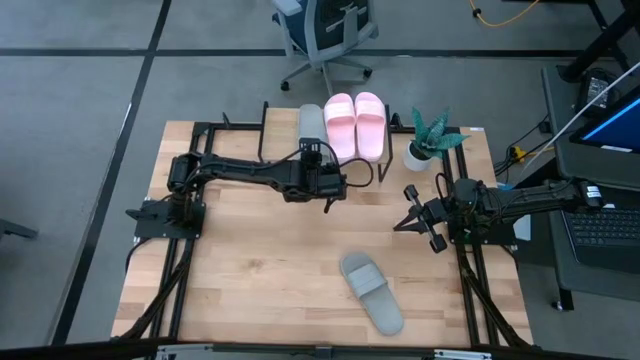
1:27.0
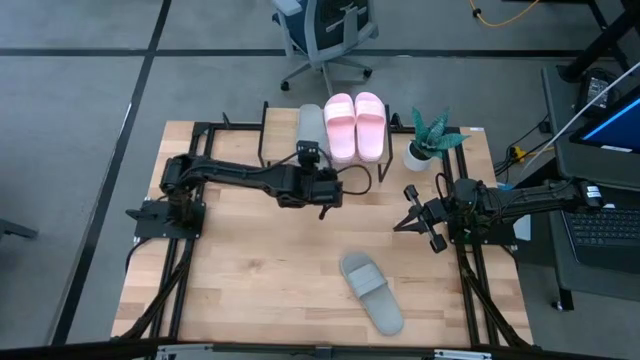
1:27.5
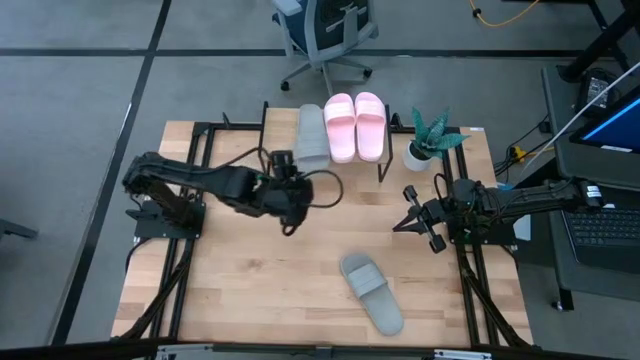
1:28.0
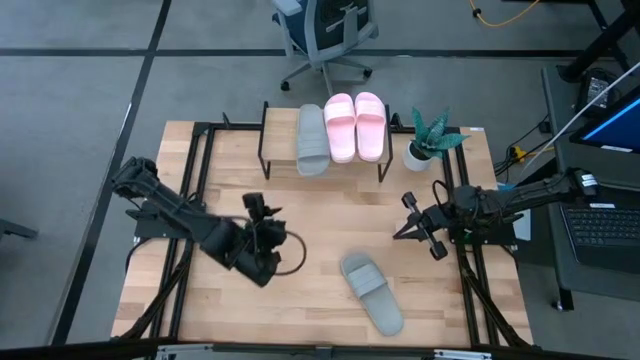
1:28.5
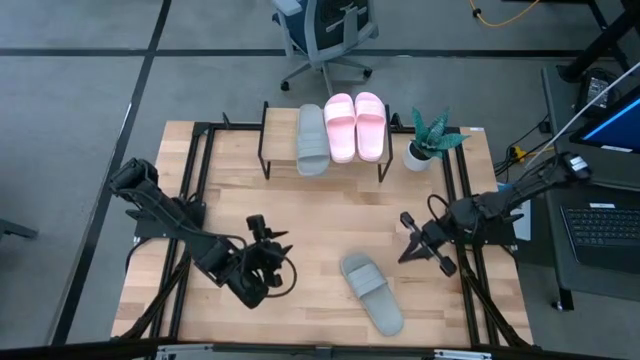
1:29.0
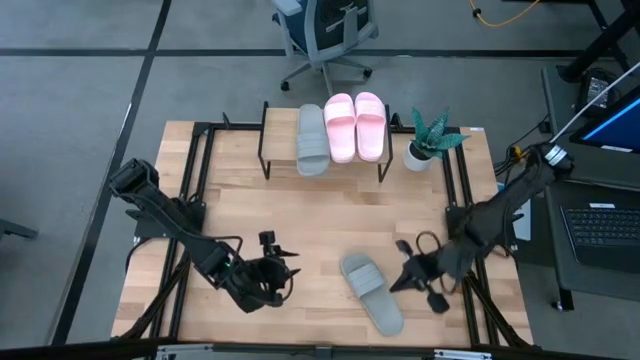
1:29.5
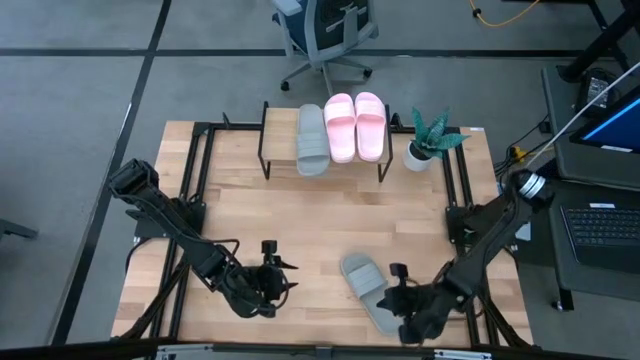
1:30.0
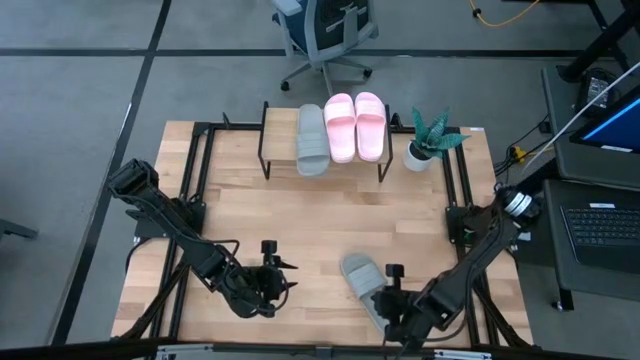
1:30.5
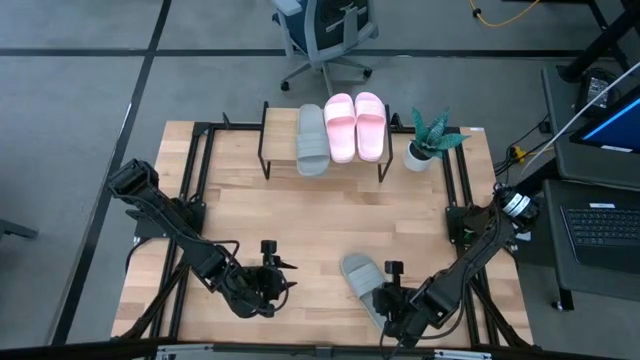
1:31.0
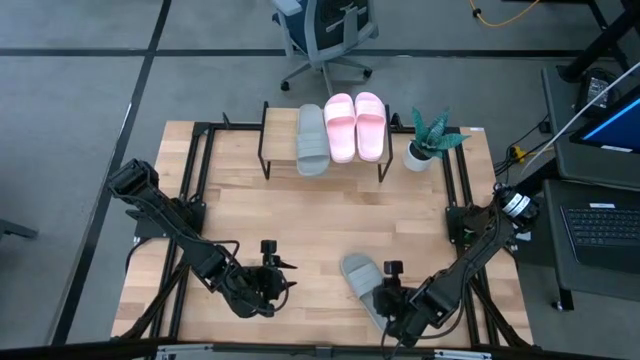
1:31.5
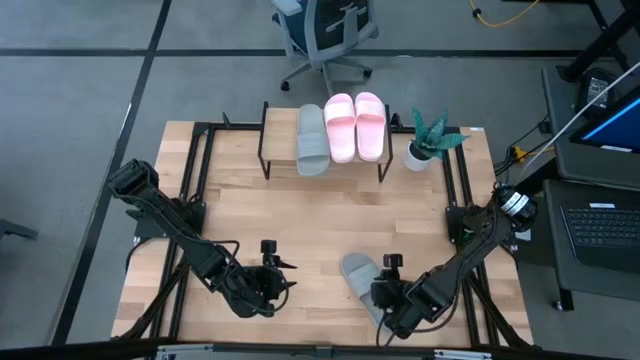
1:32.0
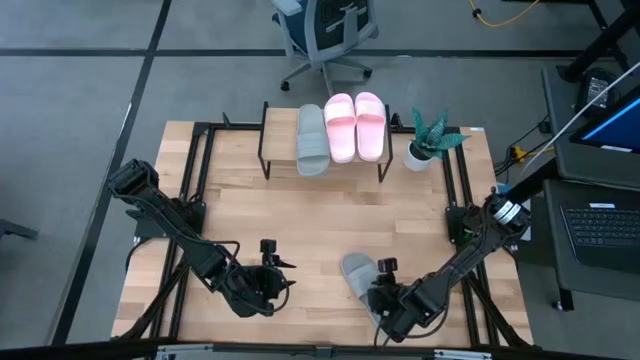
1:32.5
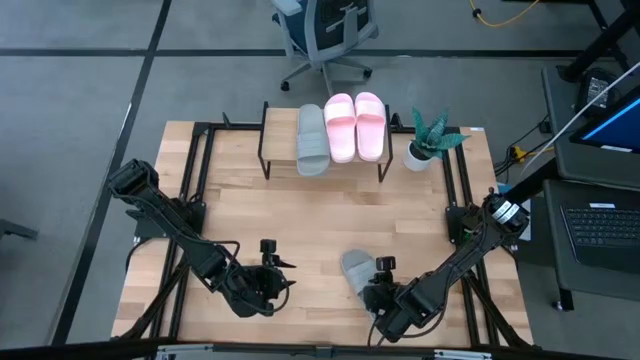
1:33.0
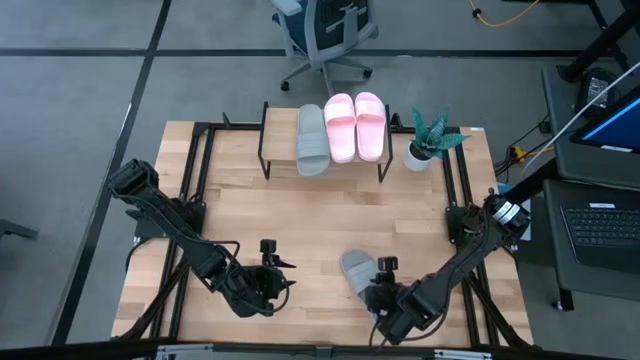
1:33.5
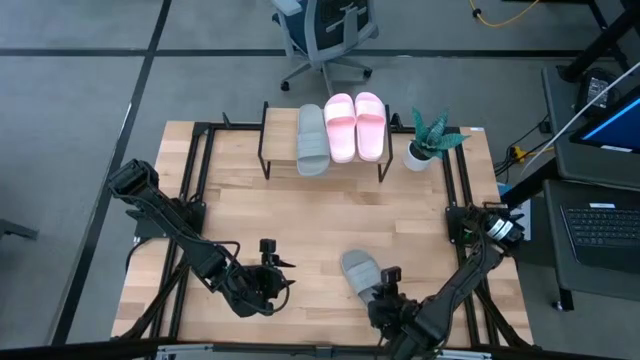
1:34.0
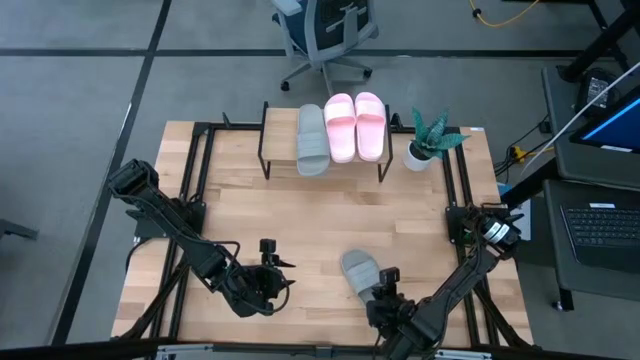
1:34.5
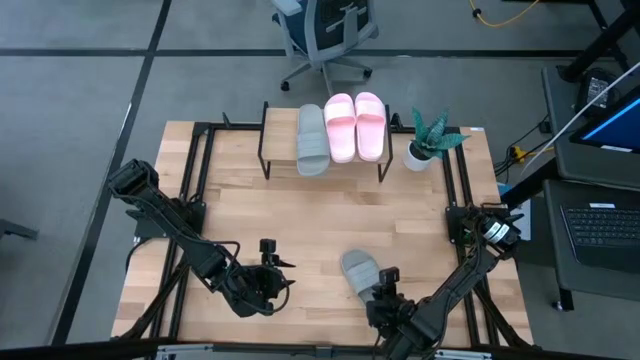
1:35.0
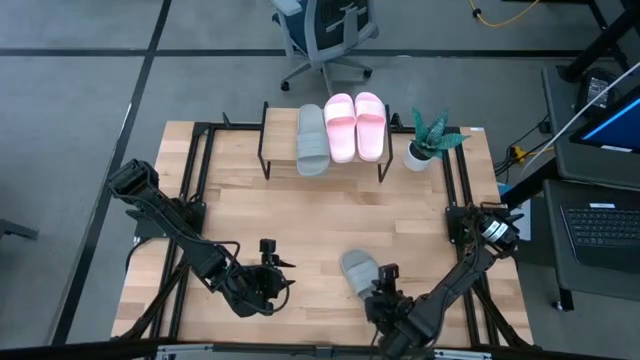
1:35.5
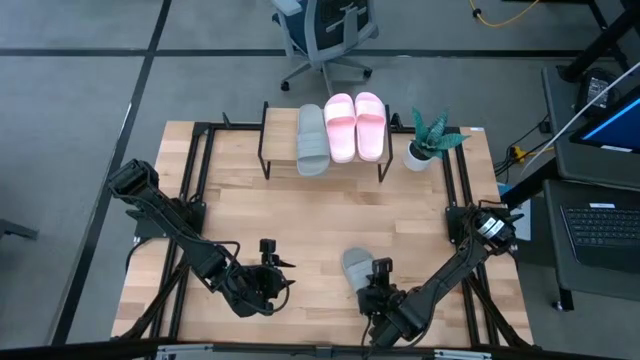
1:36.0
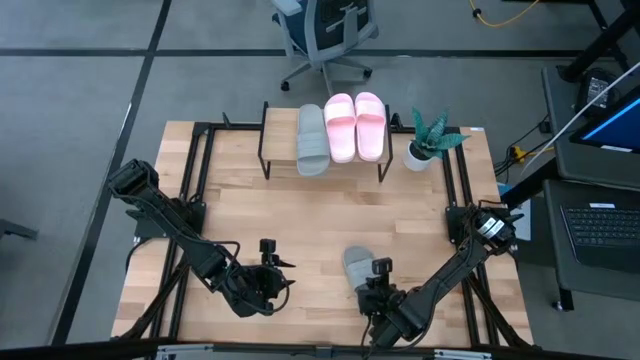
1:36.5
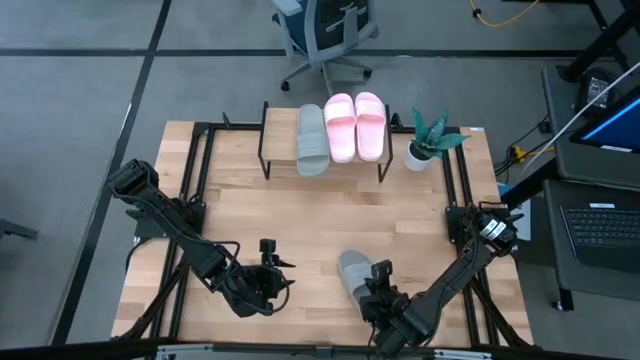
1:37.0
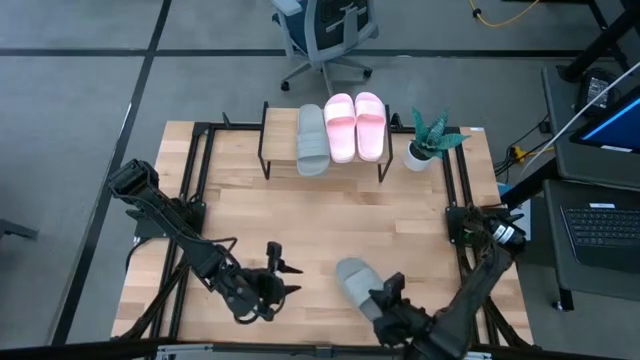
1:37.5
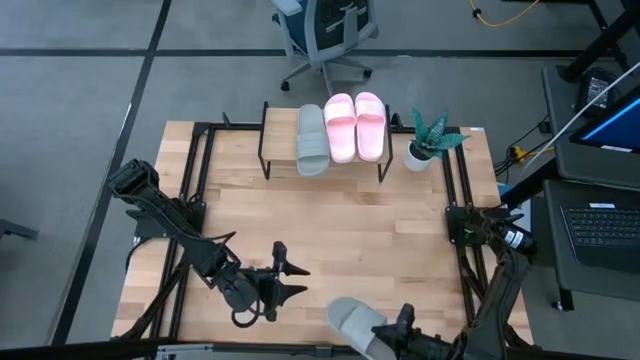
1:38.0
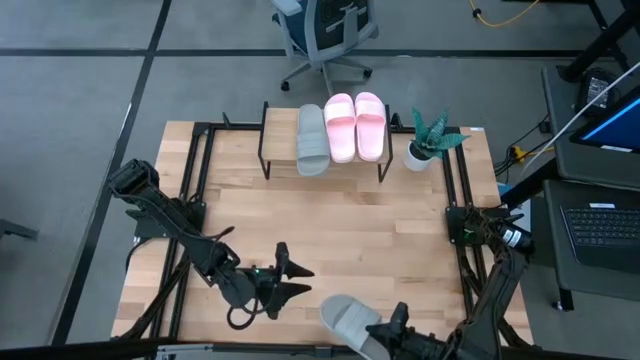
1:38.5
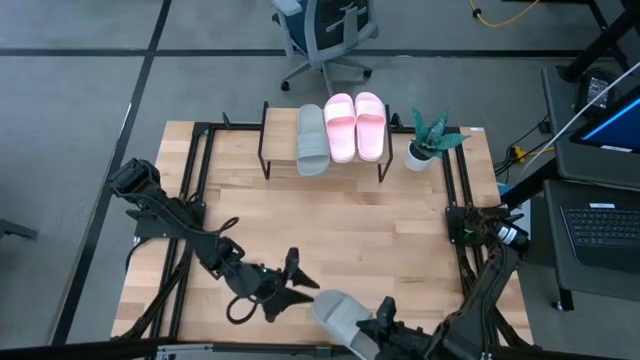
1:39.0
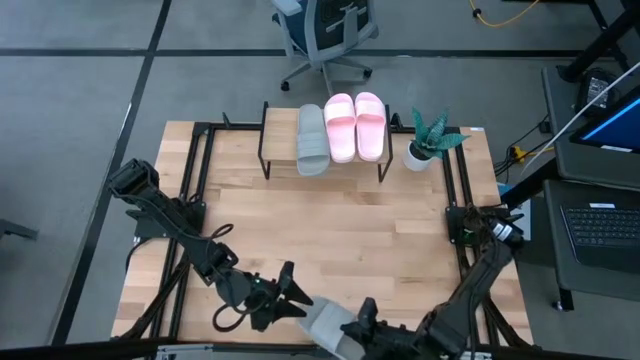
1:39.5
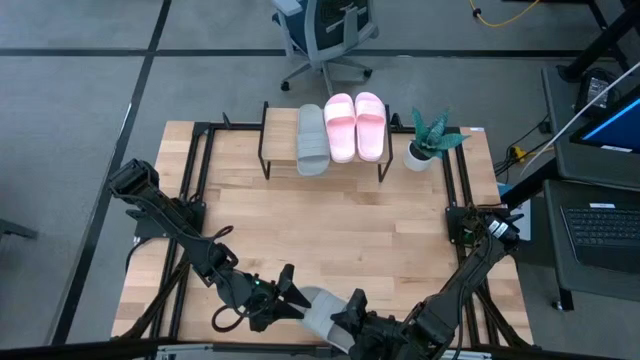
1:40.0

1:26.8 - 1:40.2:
Task: Pick and place slides into the shelf
Put the gray slipper on the shelf

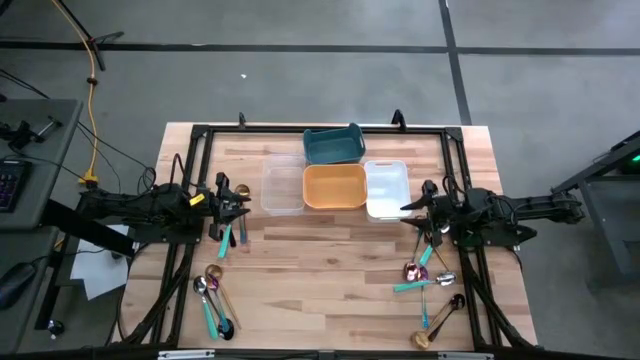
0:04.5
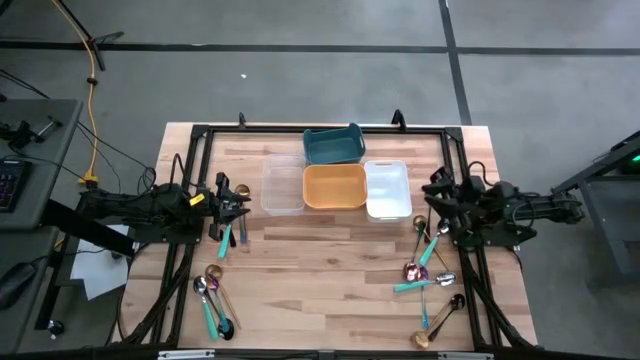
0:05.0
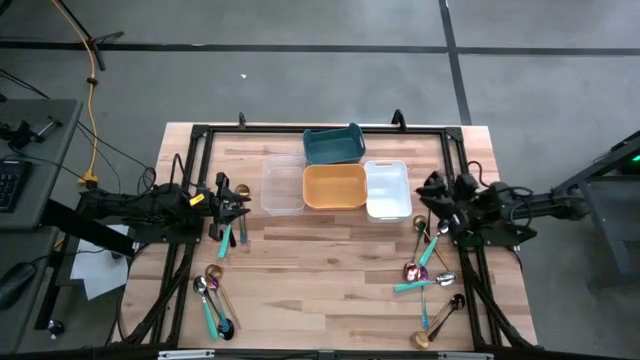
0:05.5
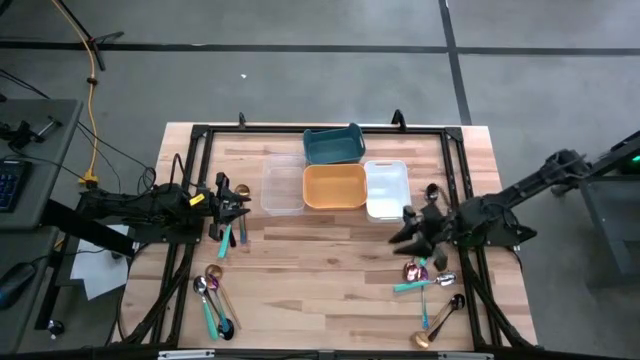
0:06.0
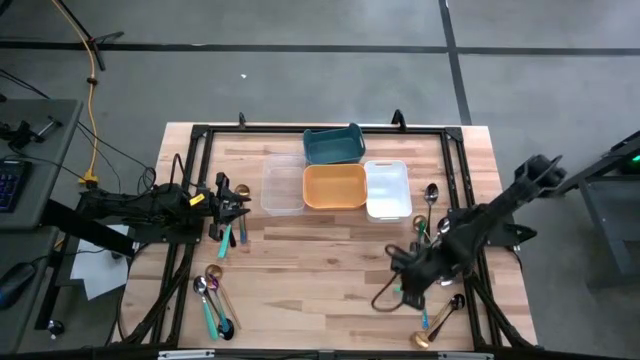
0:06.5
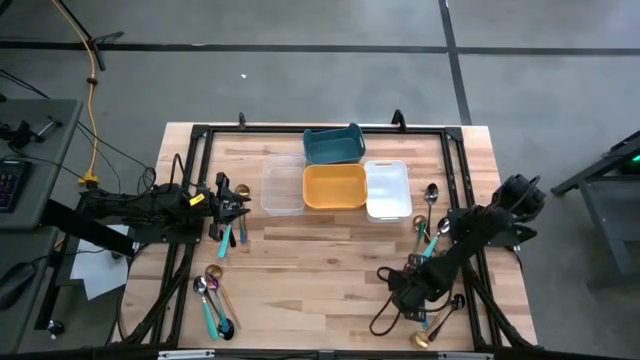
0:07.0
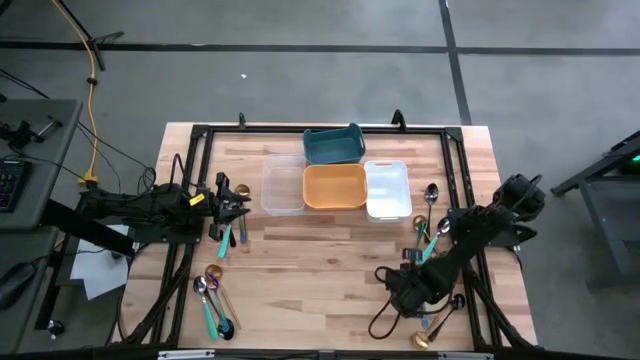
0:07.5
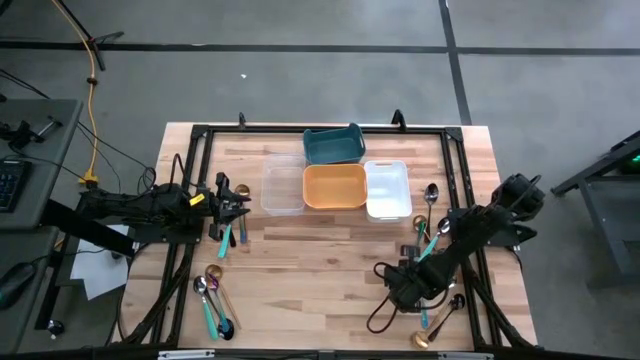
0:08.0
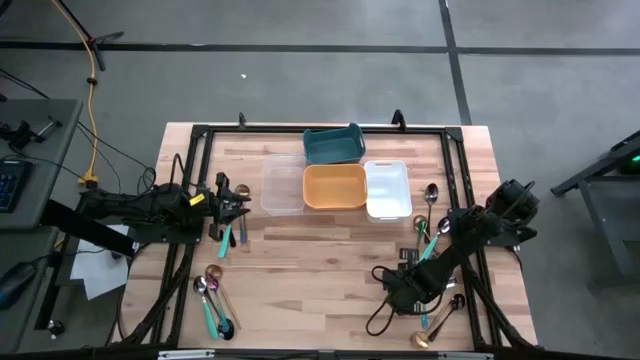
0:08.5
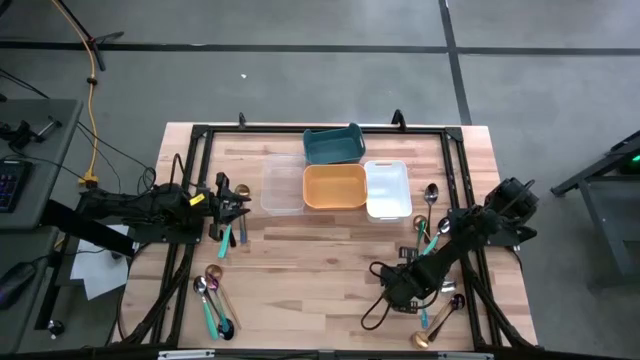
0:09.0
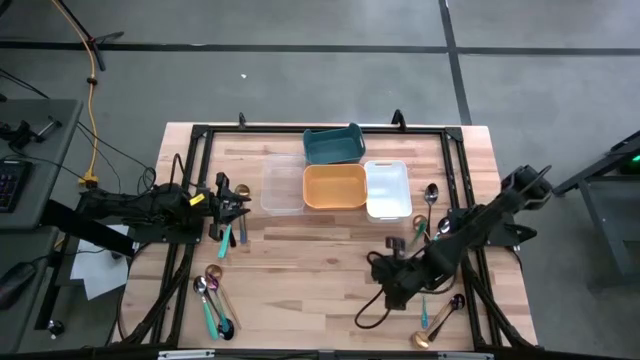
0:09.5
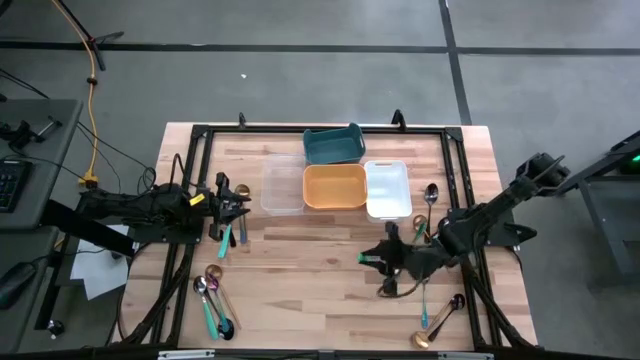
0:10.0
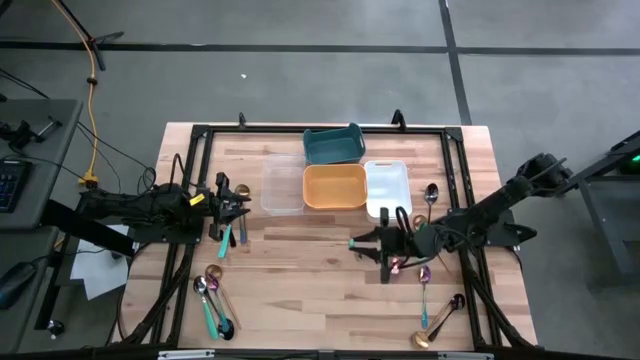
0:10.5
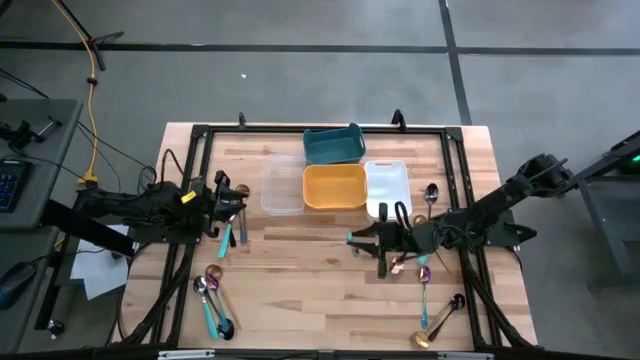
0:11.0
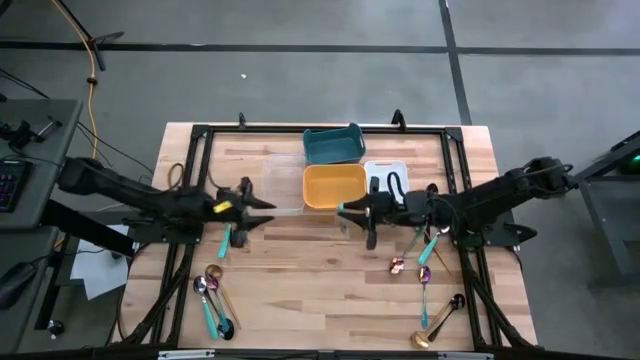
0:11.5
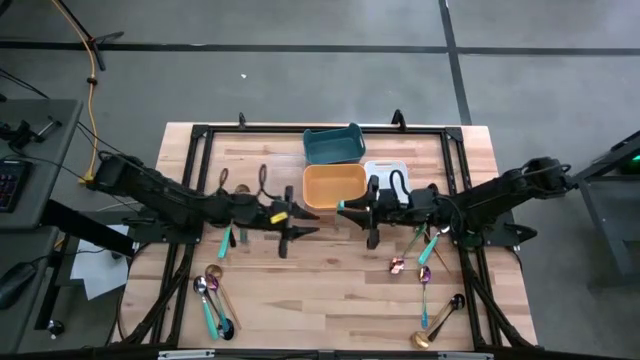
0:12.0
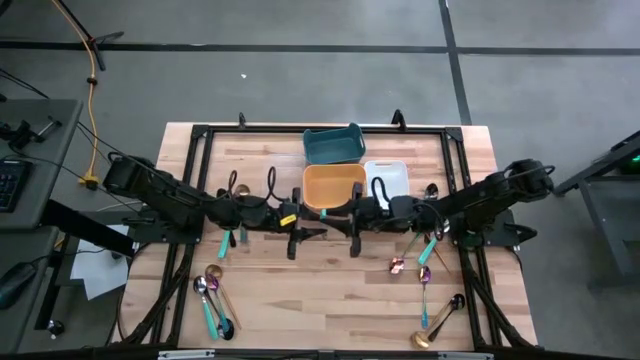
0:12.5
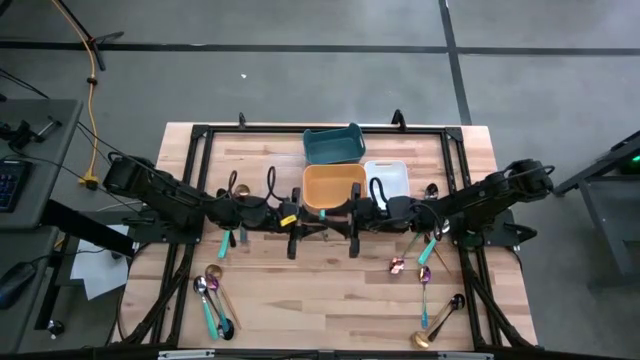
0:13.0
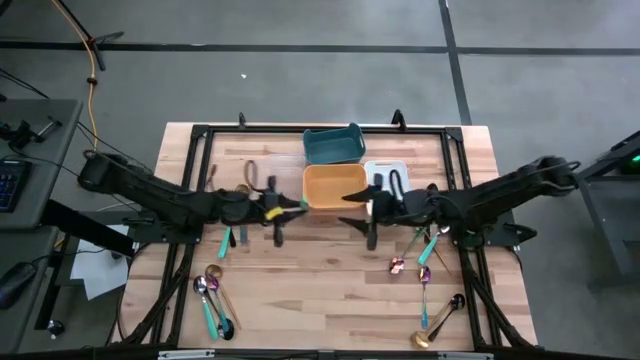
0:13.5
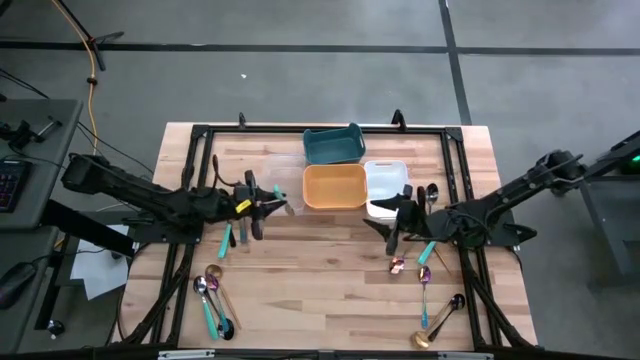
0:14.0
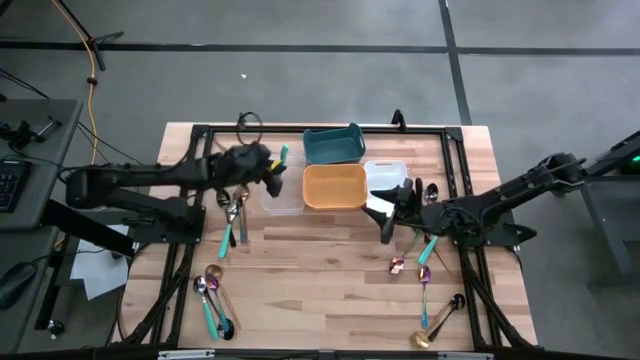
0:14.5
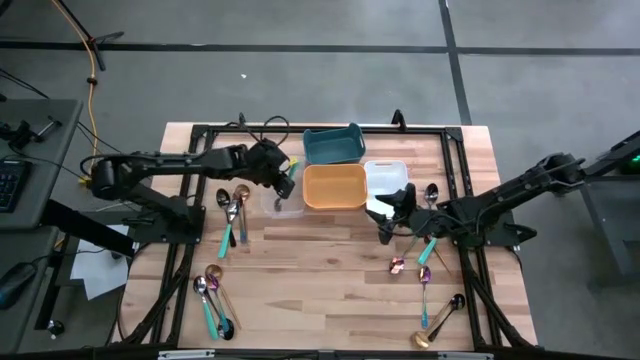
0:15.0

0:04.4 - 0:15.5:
Task: Sort silverware by color (type)
Put the turquoise blue spoon into the transparent bin
